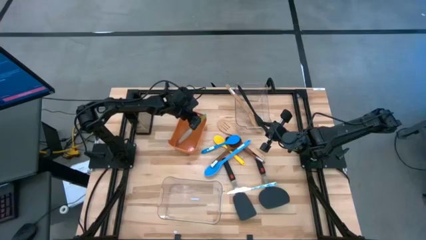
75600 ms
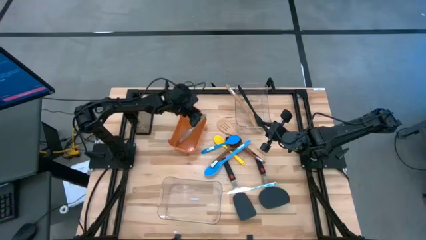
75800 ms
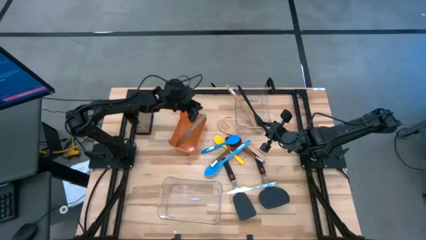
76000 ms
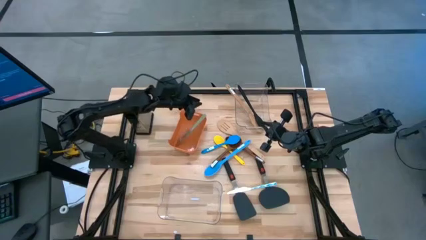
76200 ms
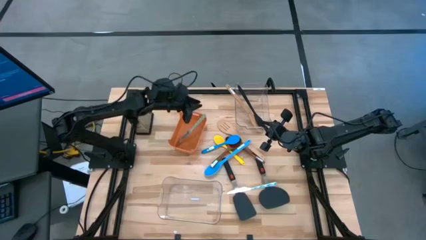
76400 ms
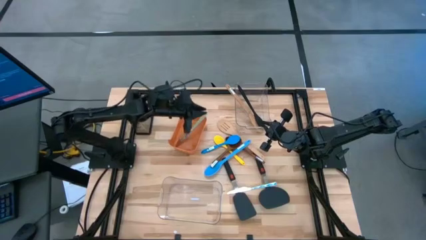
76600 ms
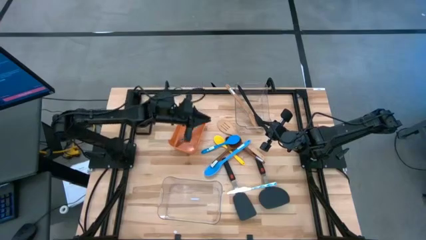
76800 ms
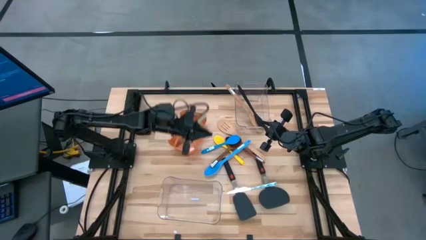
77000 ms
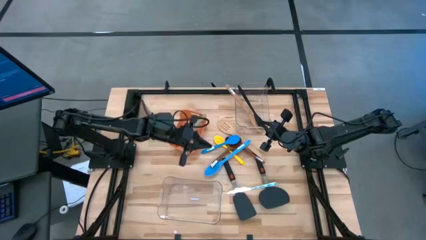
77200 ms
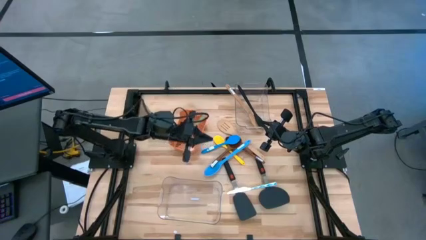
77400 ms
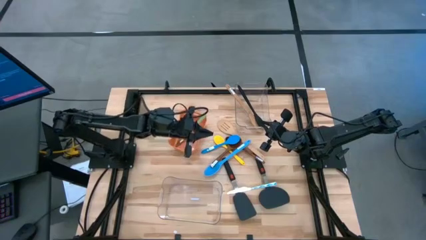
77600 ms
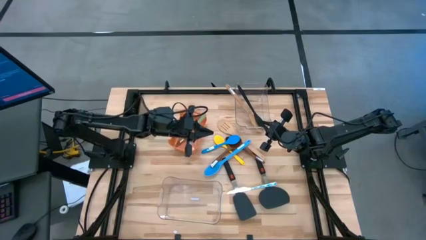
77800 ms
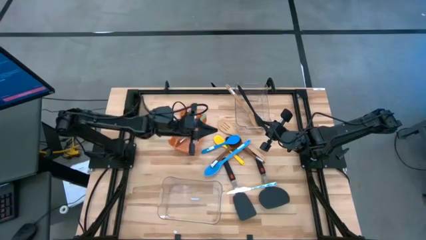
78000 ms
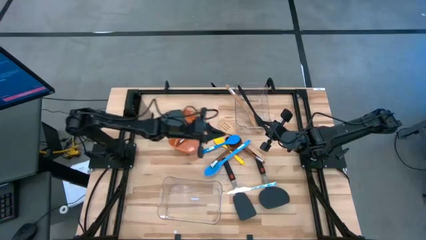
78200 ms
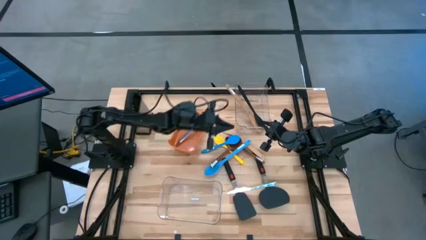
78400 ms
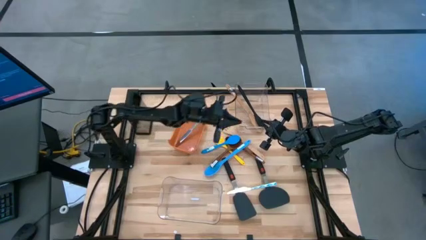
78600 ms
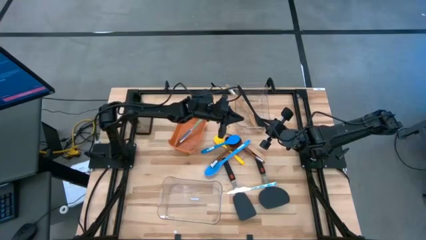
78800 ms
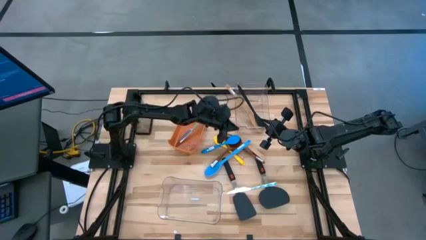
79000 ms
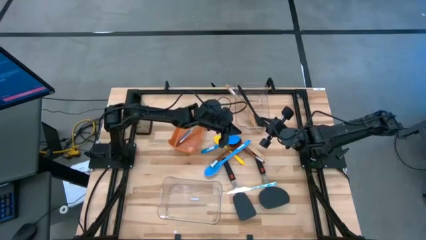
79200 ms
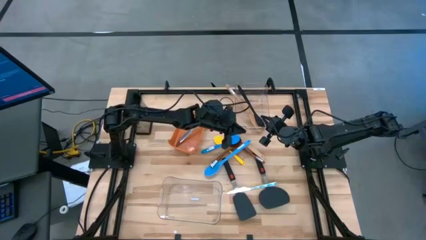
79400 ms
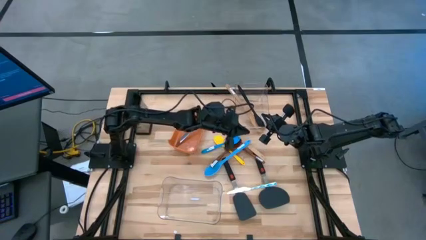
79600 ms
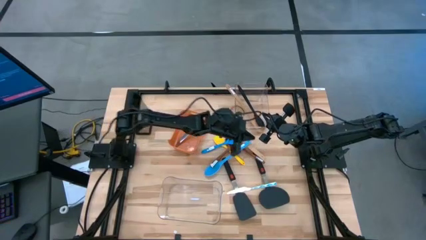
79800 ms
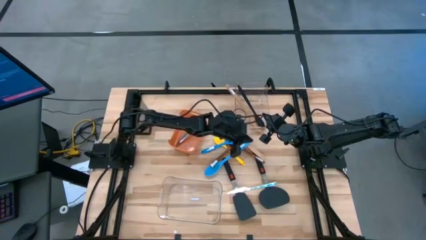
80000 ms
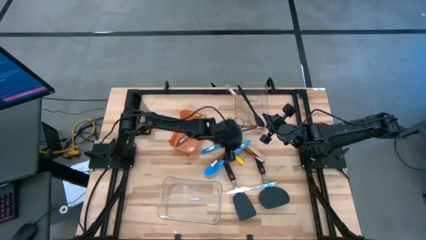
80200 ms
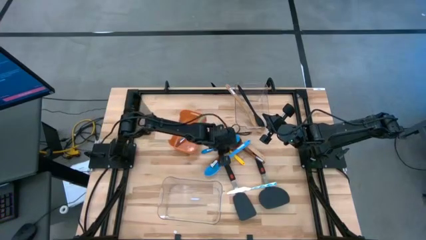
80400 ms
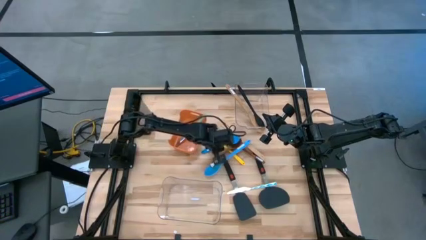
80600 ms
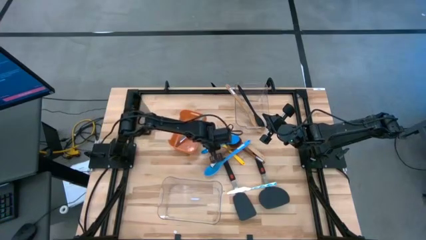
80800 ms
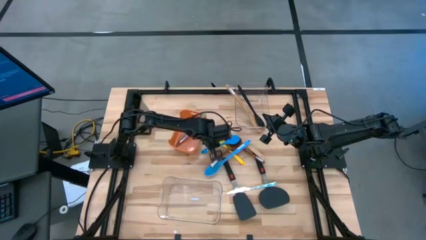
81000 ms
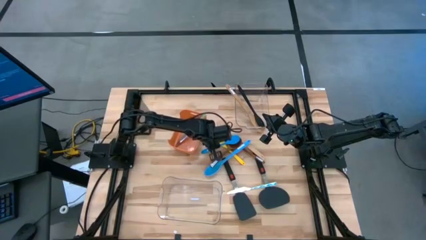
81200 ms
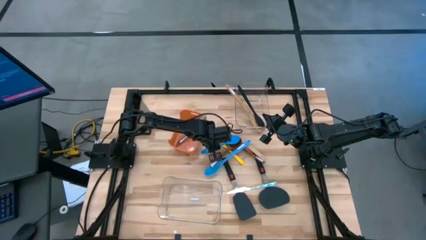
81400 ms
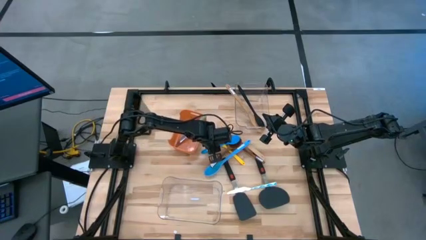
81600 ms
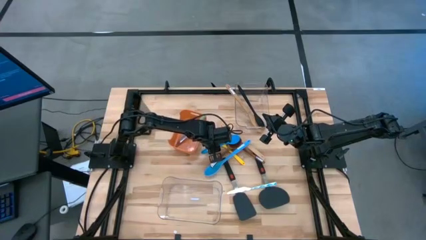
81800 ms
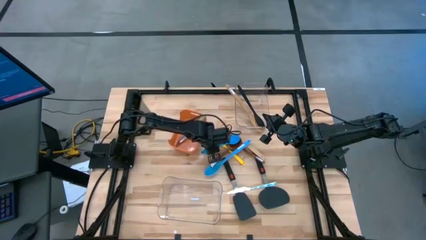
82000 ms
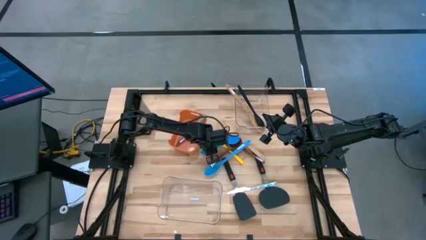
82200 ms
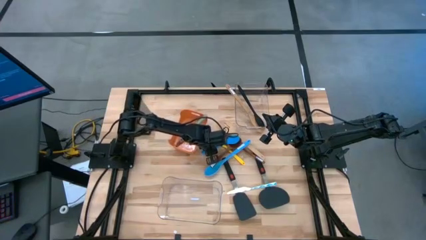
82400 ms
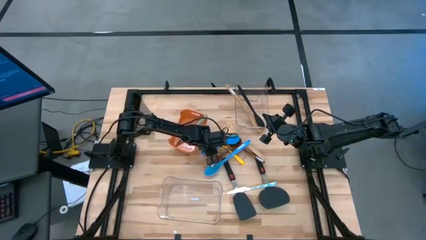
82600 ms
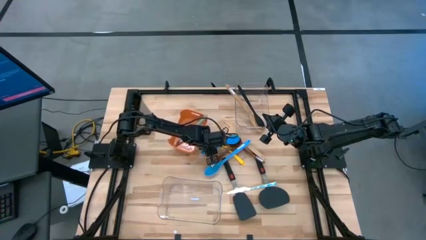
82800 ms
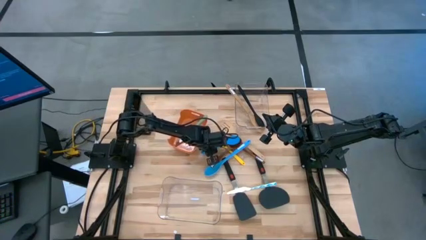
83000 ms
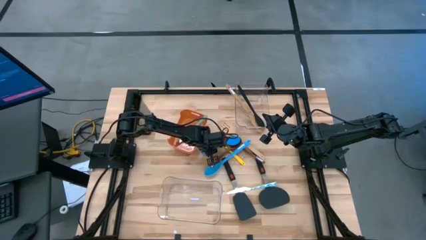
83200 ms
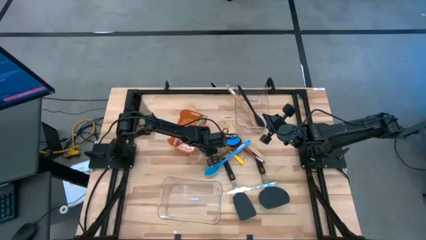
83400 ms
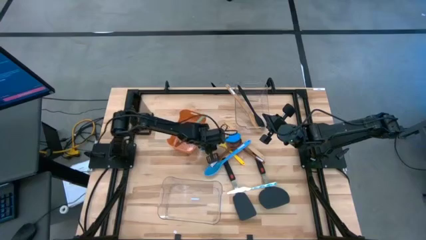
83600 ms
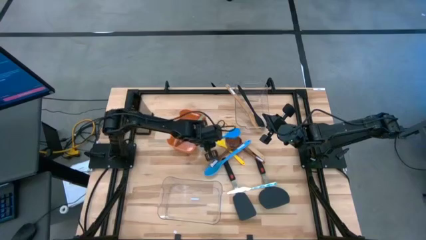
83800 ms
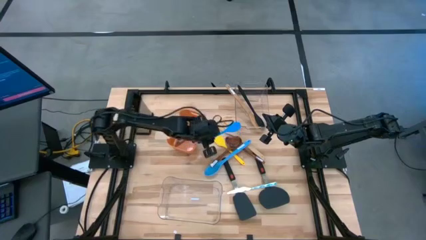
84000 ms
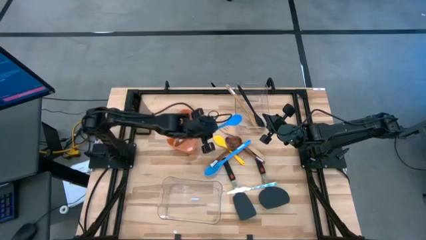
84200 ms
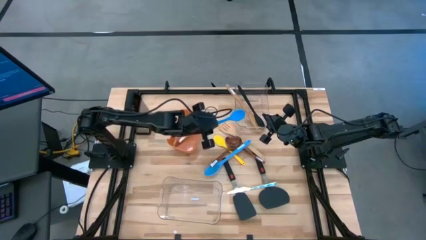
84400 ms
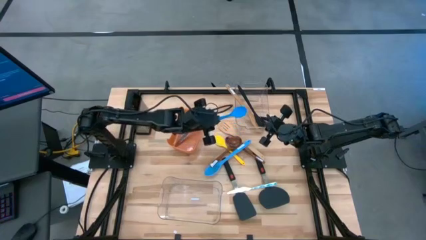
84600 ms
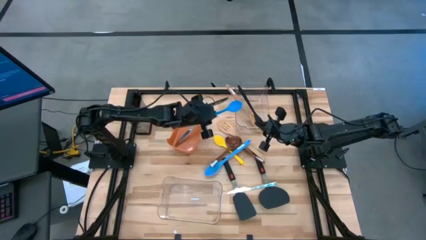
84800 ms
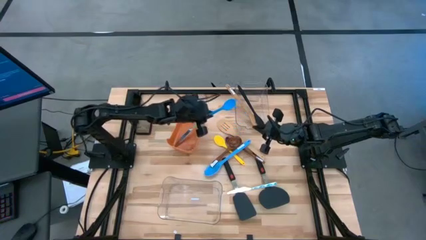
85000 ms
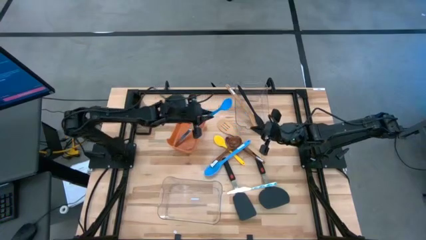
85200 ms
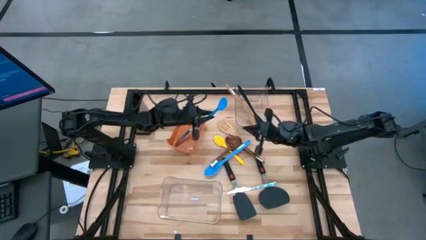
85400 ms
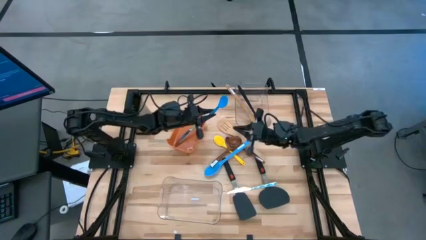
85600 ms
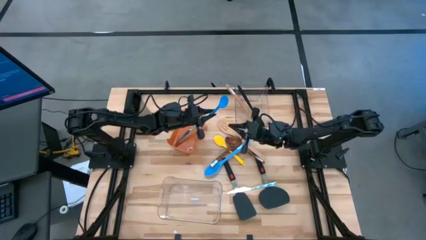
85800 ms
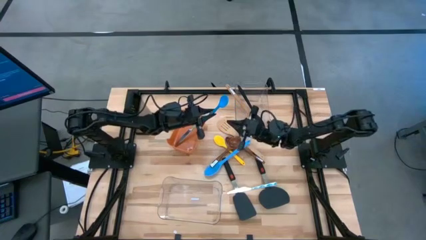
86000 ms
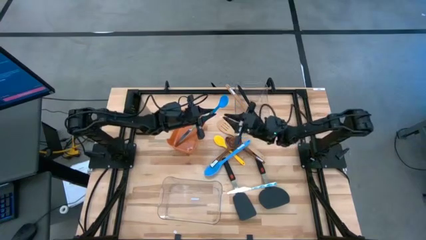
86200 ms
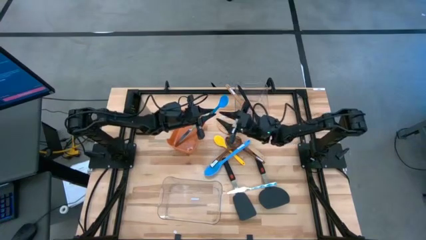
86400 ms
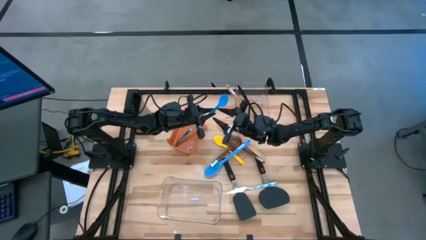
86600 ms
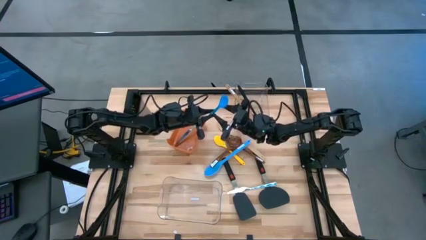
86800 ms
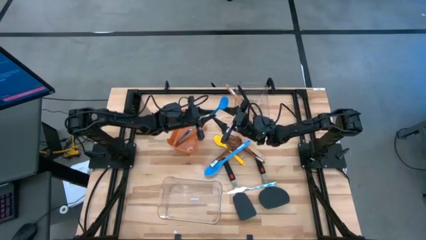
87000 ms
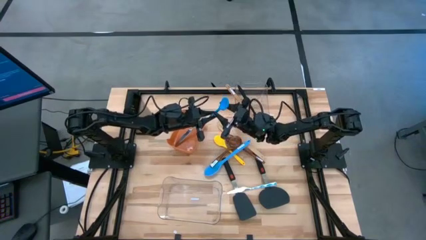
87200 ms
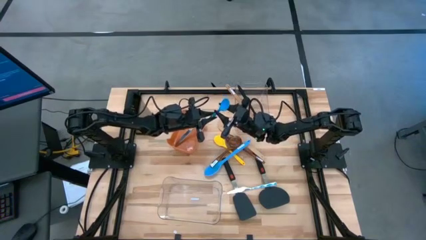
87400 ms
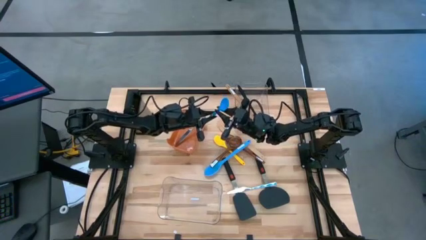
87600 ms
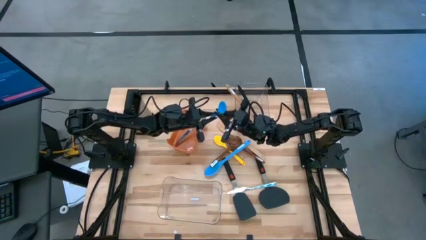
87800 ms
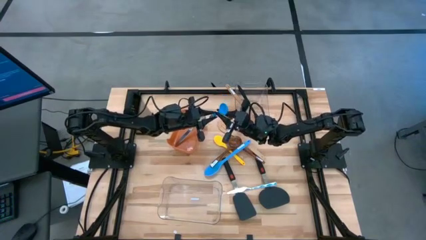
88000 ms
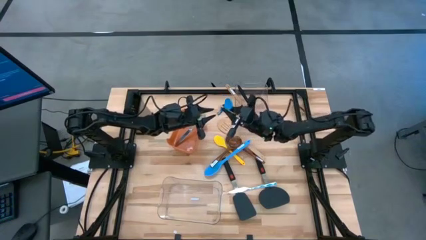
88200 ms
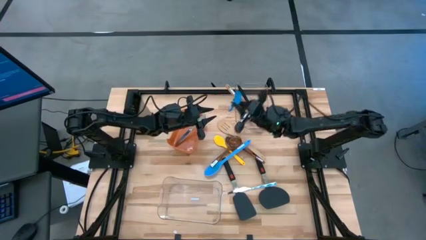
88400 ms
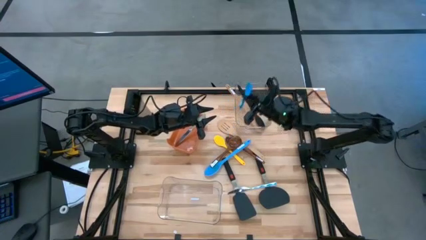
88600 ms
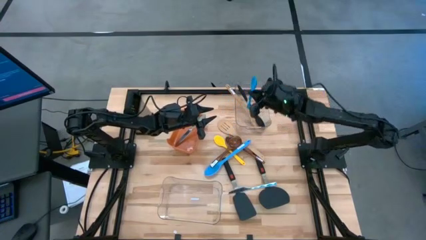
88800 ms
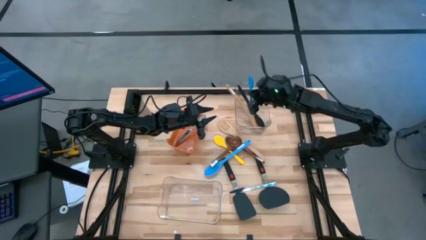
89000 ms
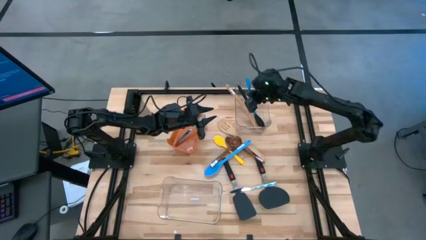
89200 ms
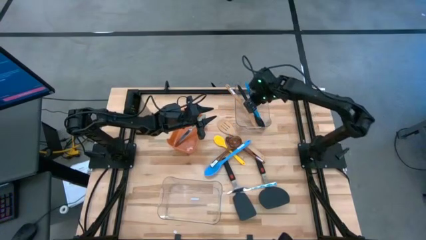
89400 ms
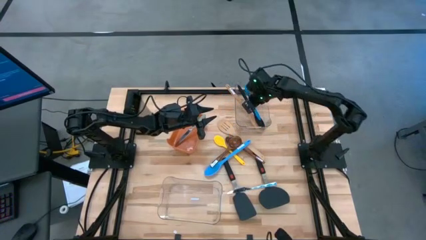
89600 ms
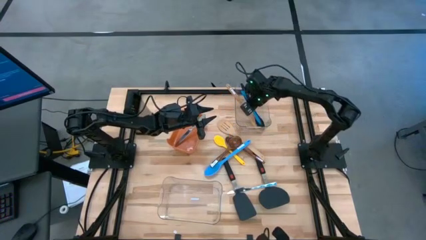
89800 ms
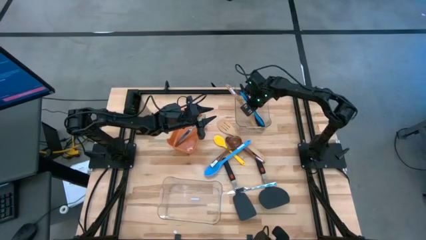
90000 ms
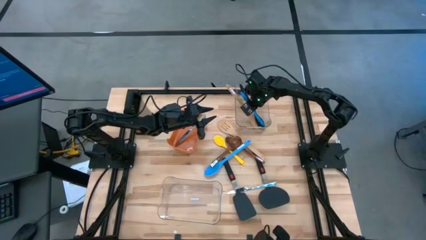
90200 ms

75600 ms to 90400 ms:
Task: Pick & Place Kitchen Items
Put the blue serving spoon into the top transparent bin
